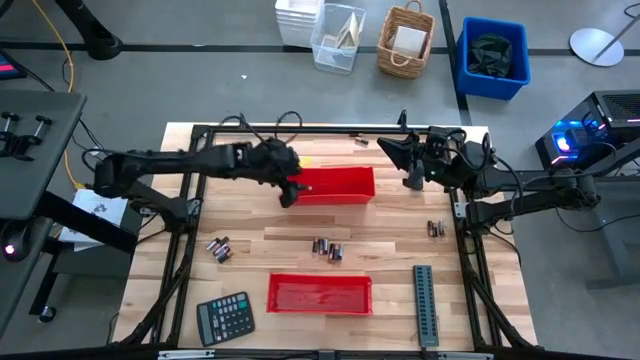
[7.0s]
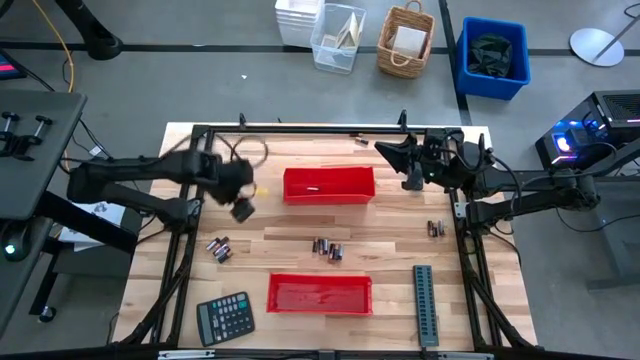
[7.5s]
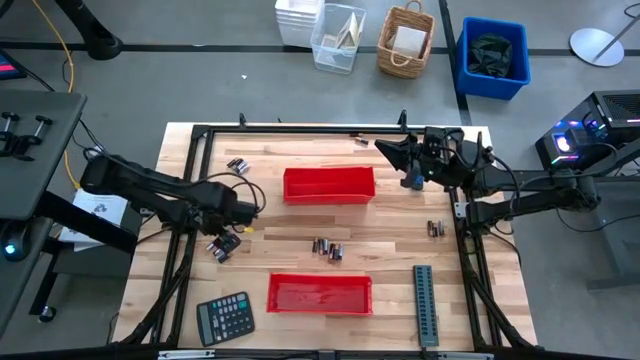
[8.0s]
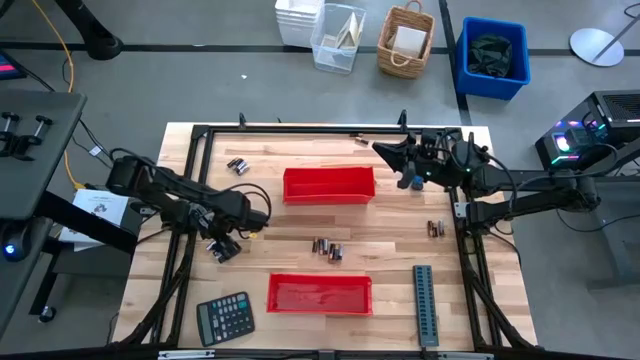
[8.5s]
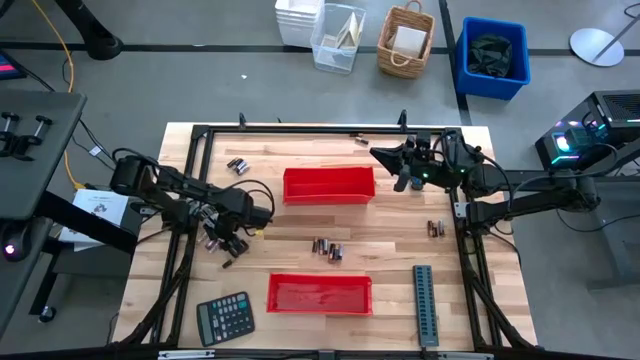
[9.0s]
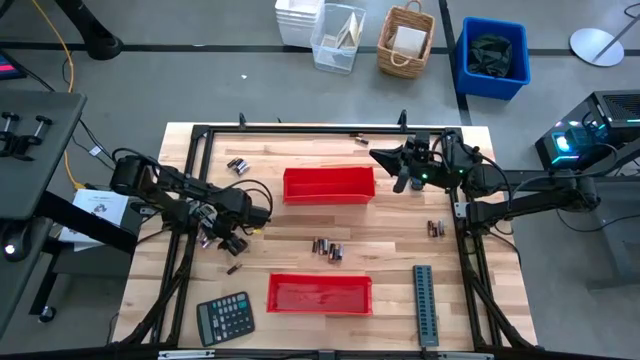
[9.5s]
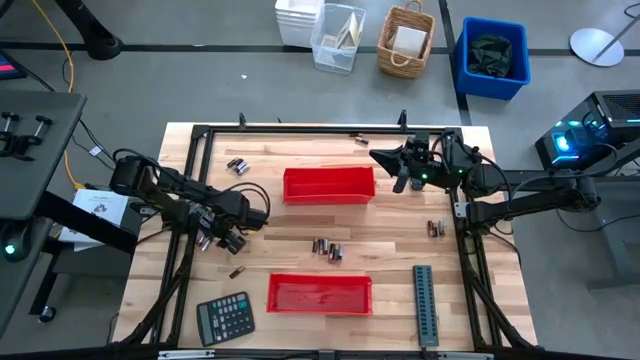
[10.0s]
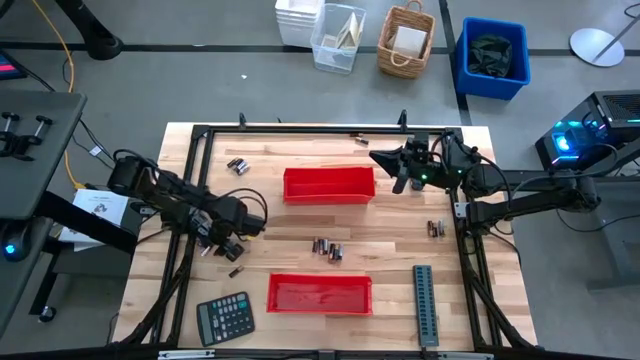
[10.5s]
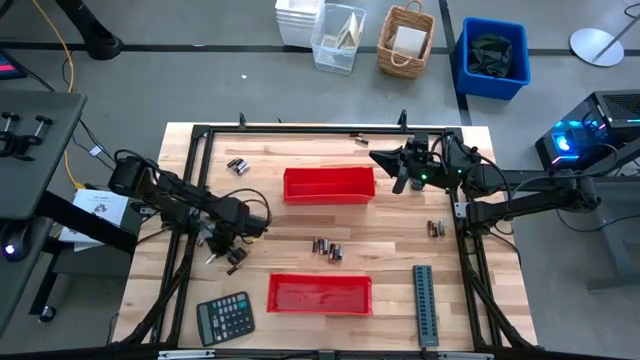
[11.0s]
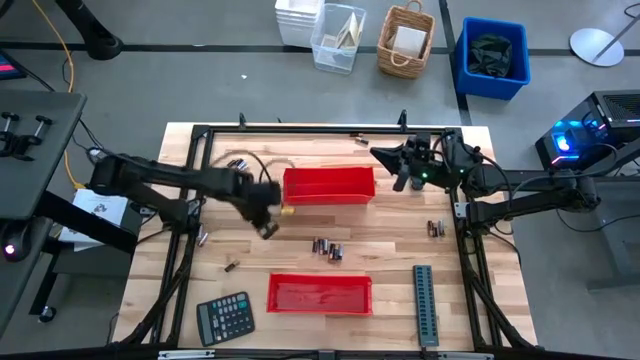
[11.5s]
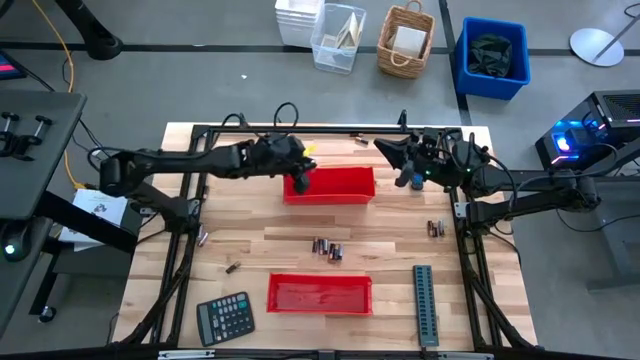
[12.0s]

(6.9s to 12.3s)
Task: Sort batteries
Put the silver battery into the top red bin

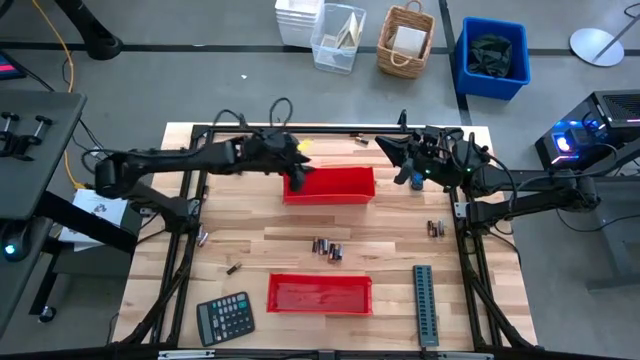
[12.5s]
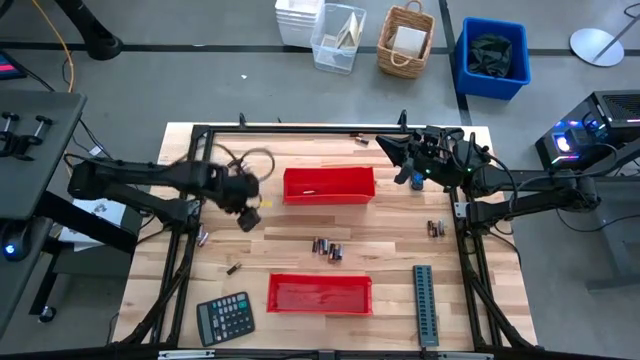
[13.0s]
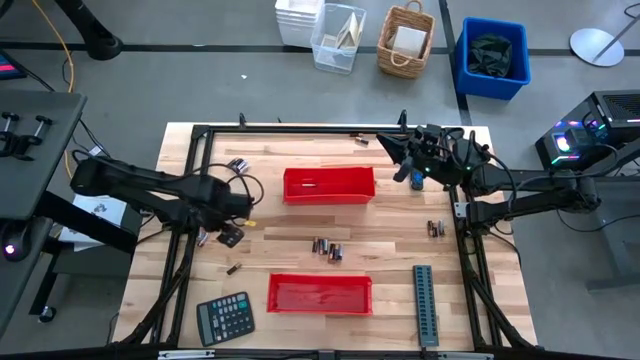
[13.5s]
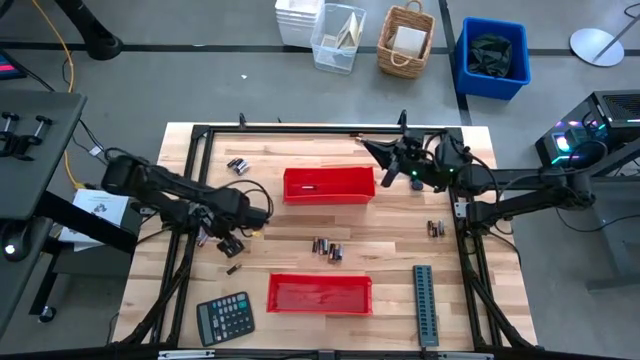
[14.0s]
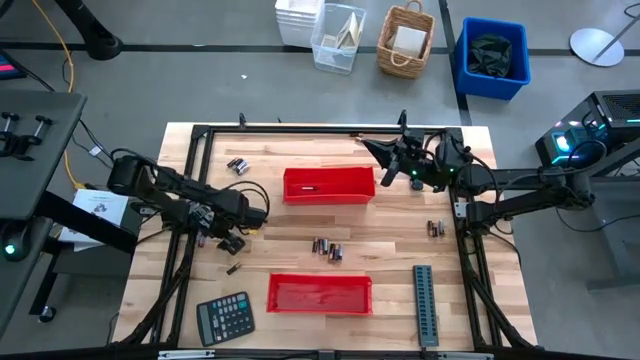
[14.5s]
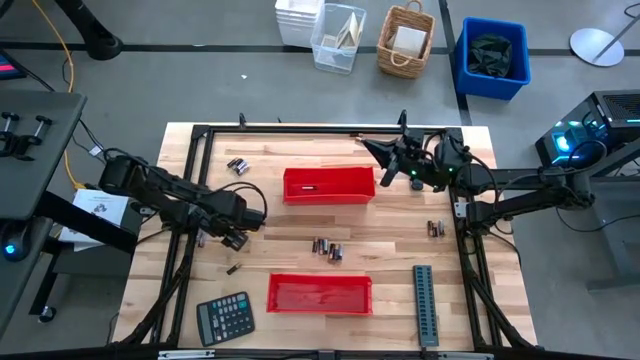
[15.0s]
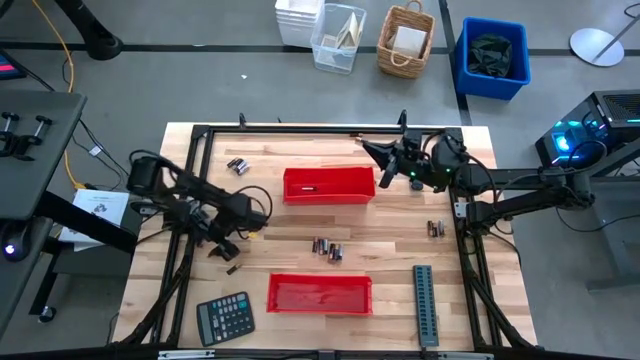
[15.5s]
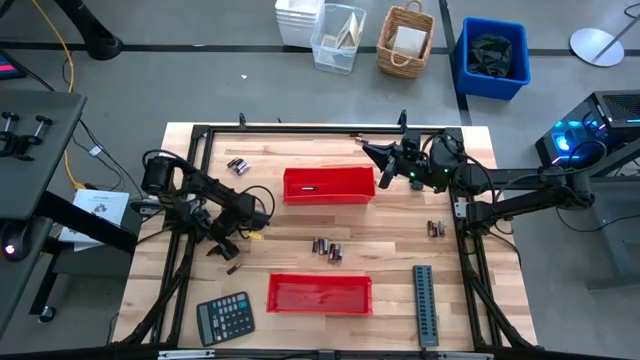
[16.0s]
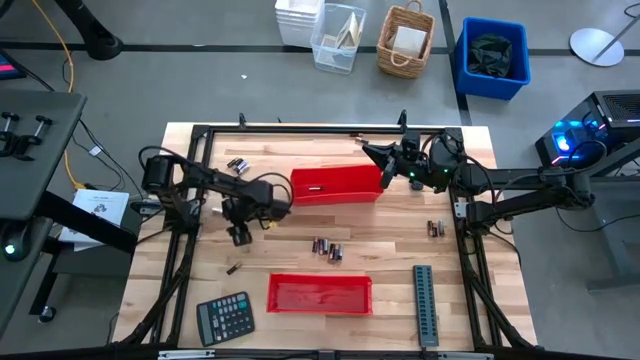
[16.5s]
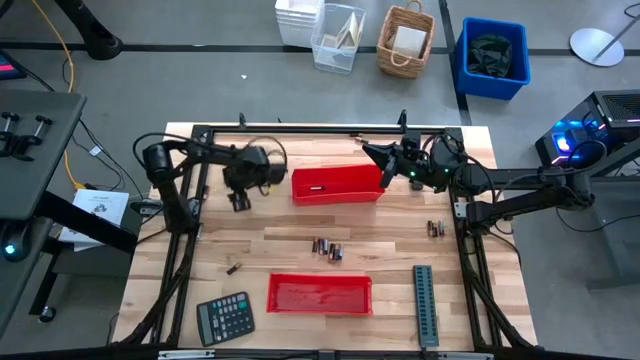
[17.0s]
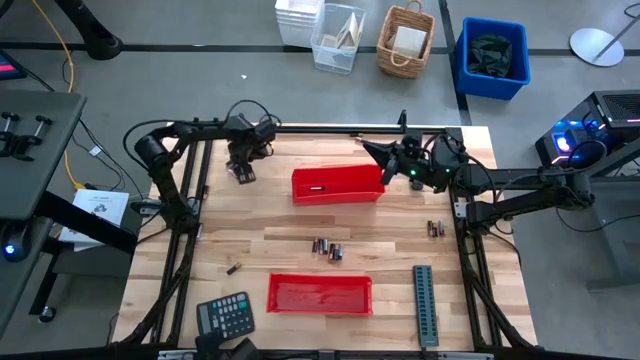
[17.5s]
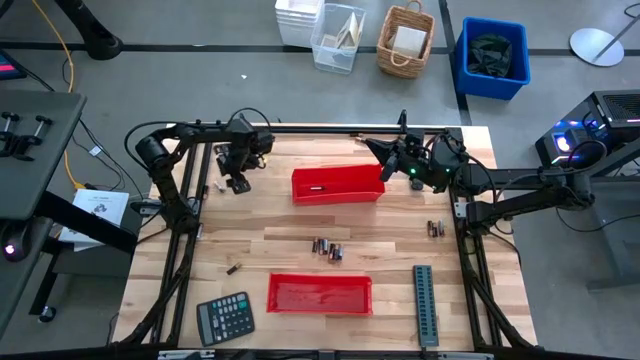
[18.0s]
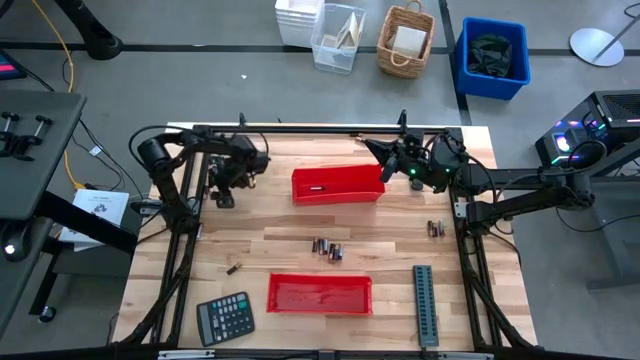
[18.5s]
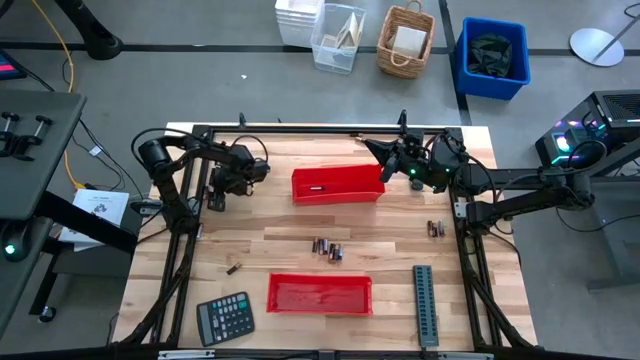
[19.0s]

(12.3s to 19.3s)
Put the silver battery into the top red bin

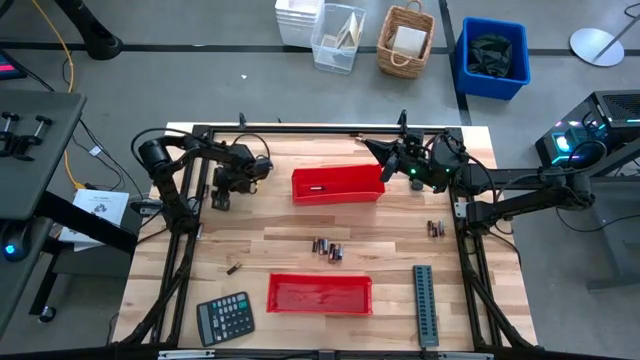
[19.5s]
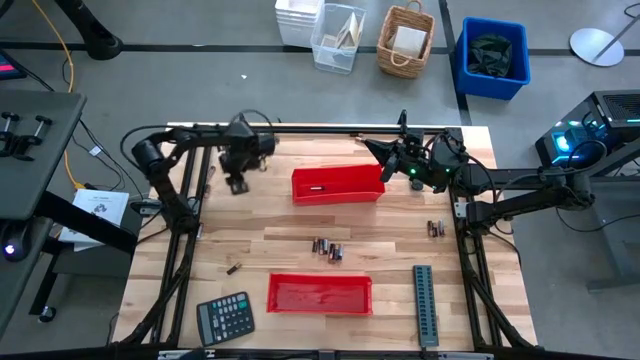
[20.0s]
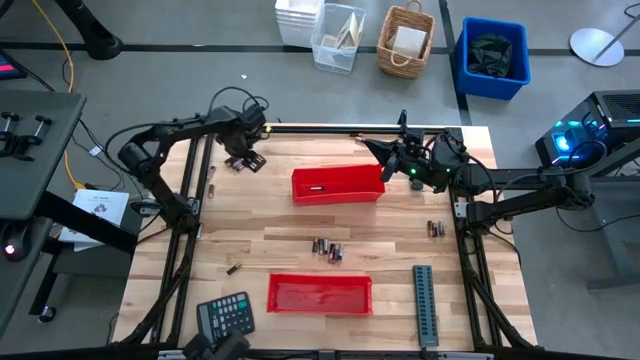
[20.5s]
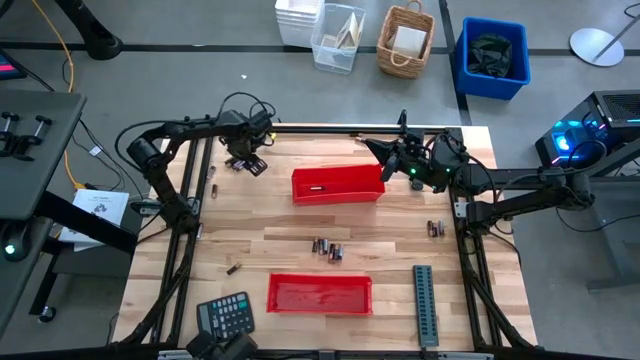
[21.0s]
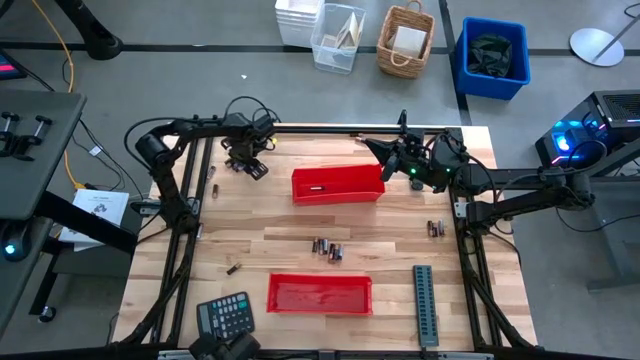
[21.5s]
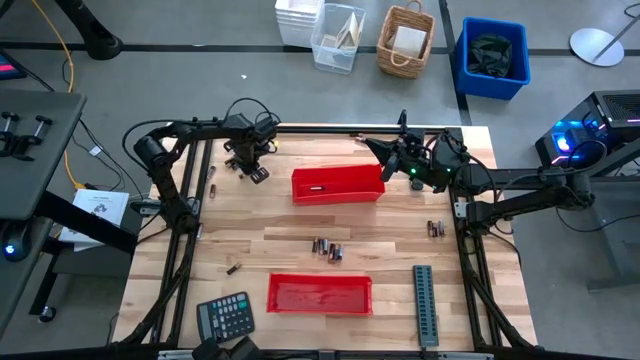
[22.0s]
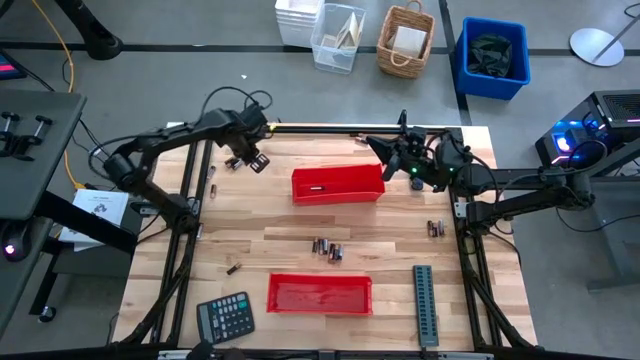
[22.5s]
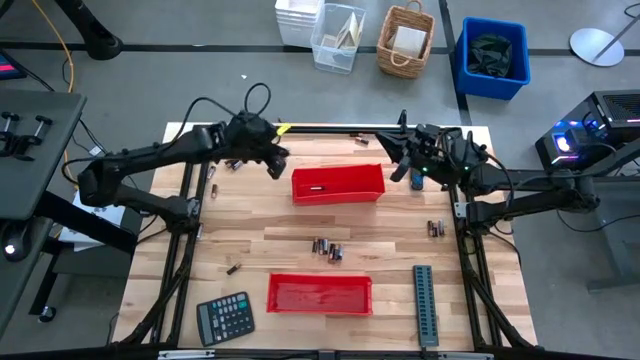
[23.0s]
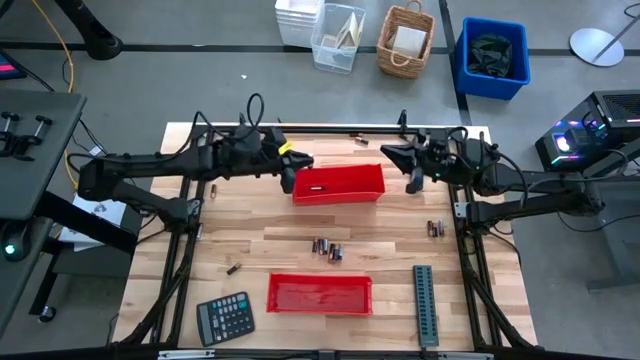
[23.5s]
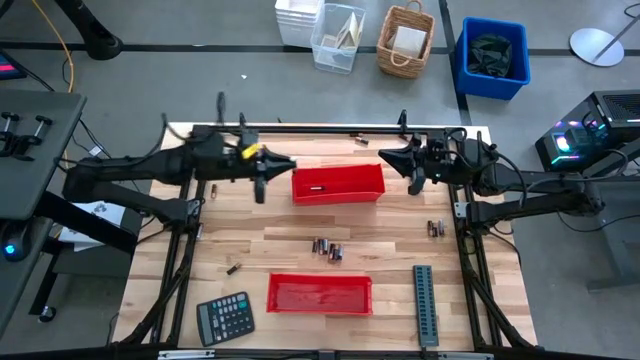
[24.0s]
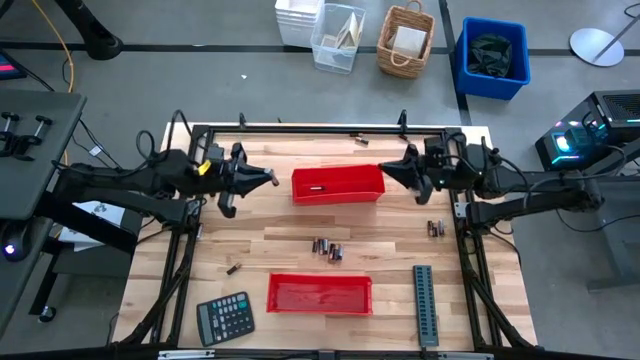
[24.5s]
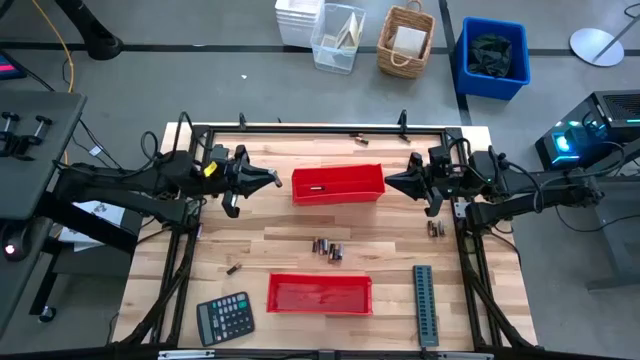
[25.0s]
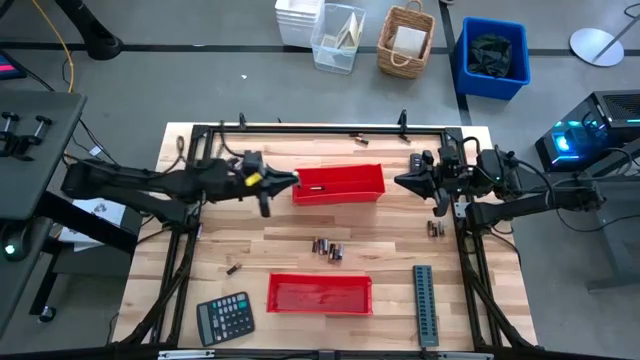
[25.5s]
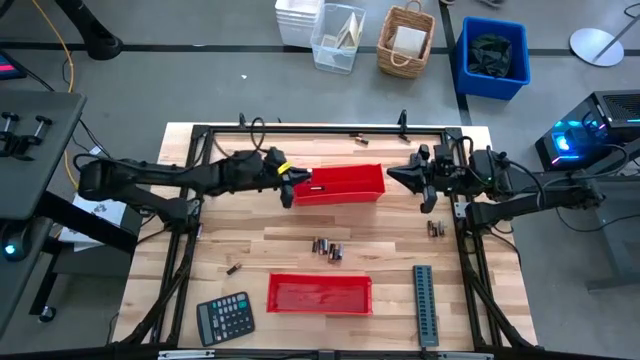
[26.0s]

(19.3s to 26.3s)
Put the silver battery into the top red bin

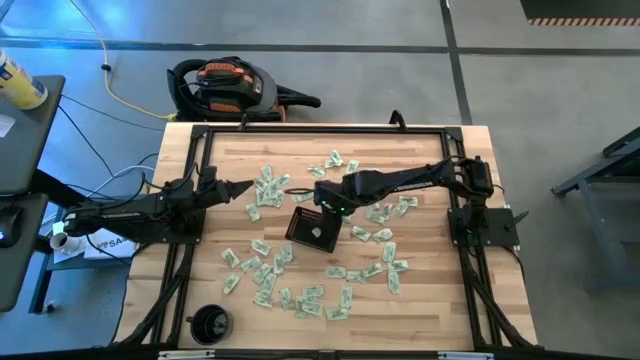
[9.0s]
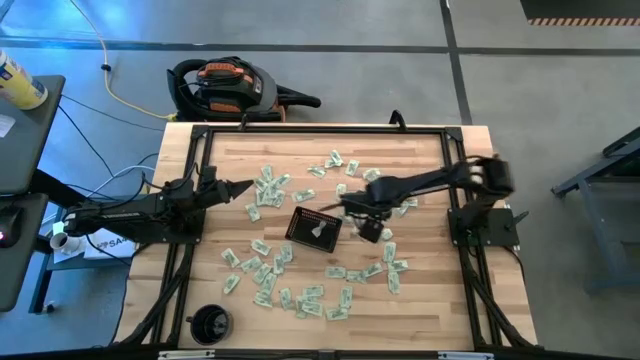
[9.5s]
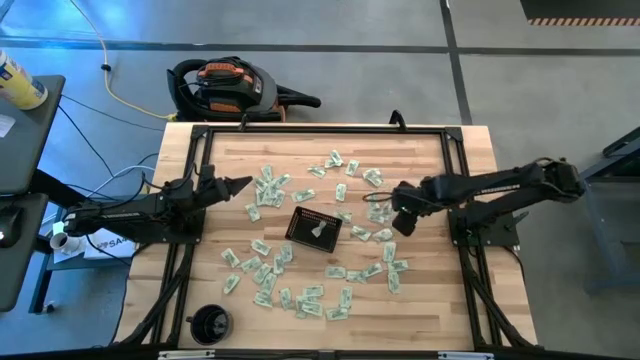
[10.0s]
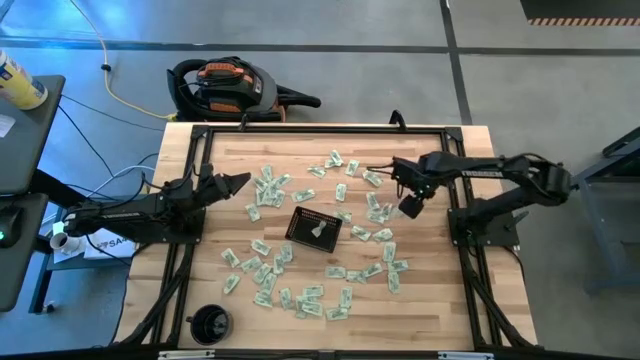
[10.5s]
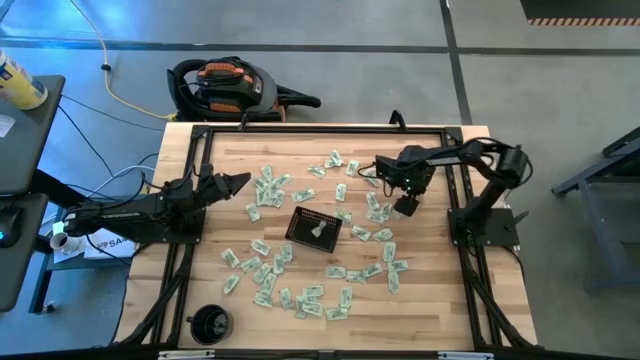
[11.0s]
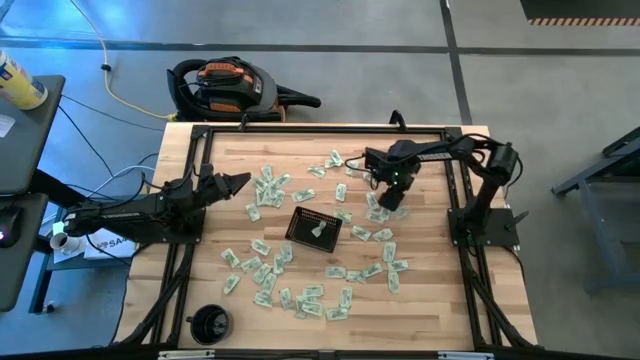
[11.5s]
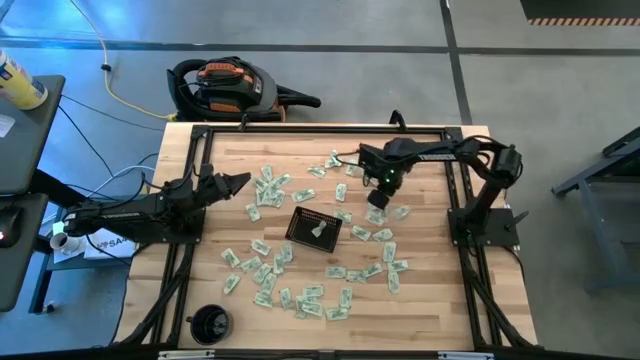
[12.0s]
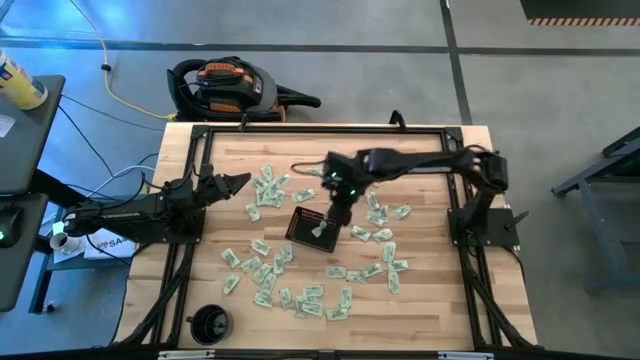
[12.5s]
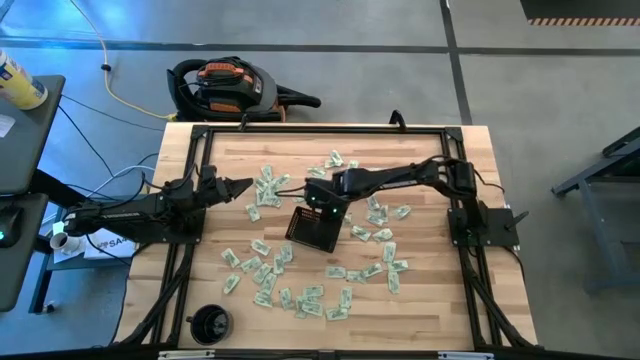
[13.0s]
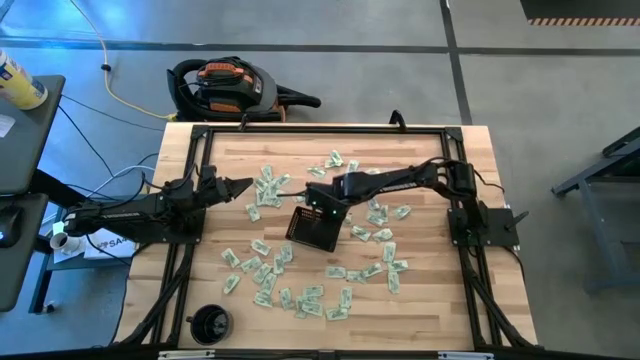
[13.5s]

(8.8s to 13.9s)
Task: Pick and place Stevia / Truvia into bins
Put the green stevia packet into the black basket
